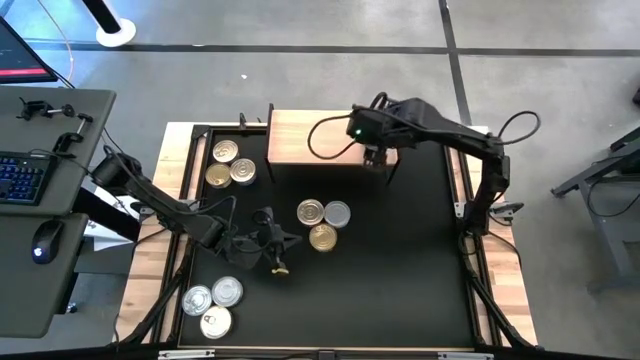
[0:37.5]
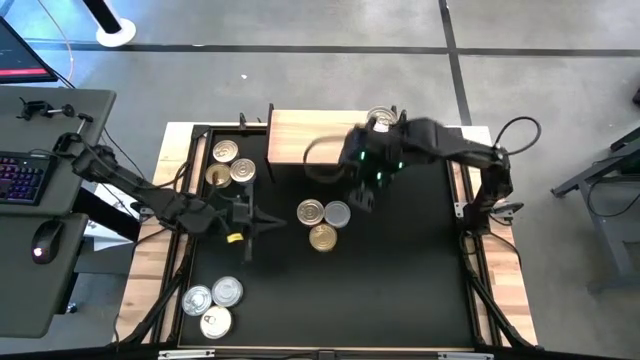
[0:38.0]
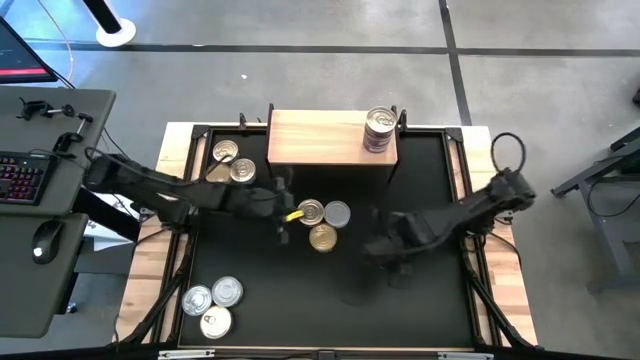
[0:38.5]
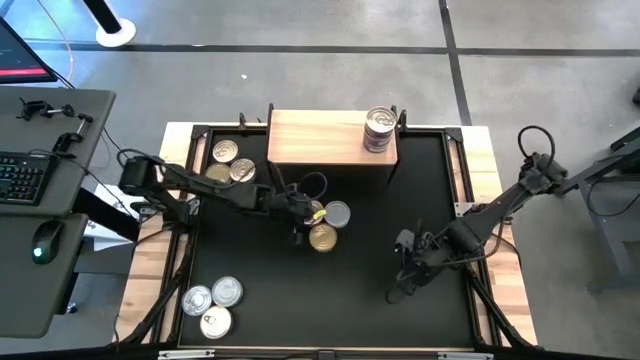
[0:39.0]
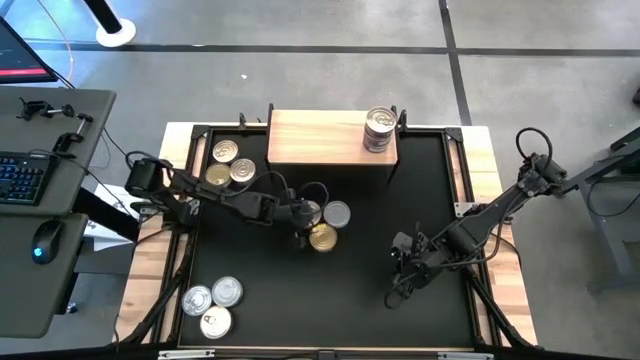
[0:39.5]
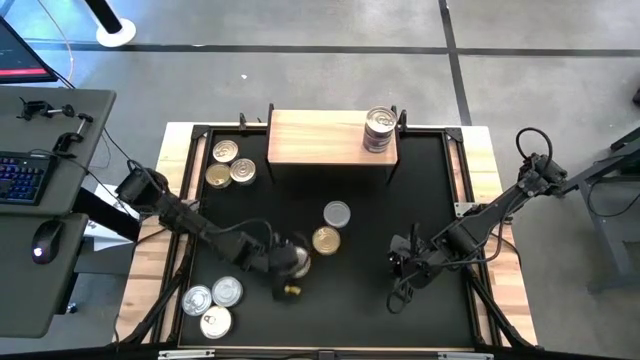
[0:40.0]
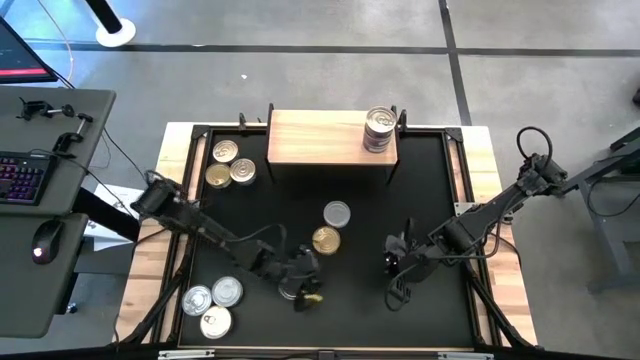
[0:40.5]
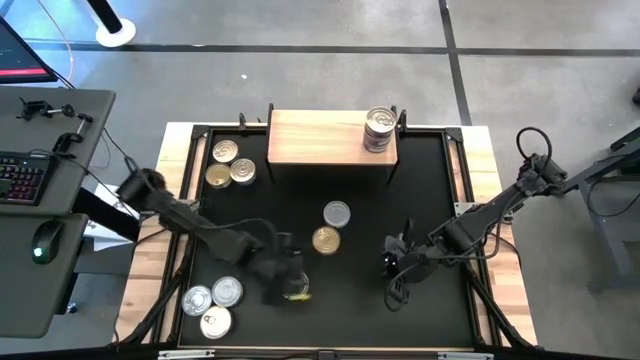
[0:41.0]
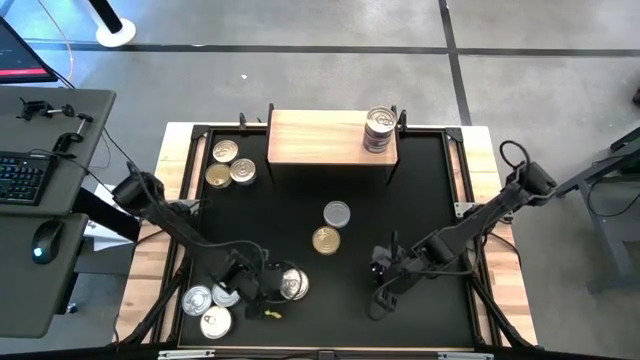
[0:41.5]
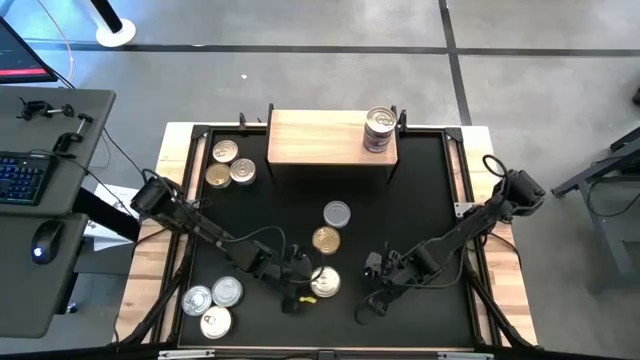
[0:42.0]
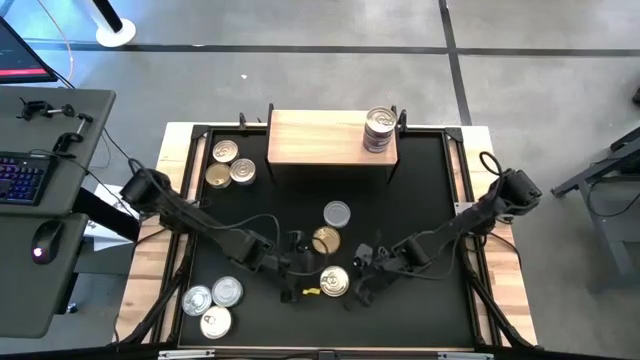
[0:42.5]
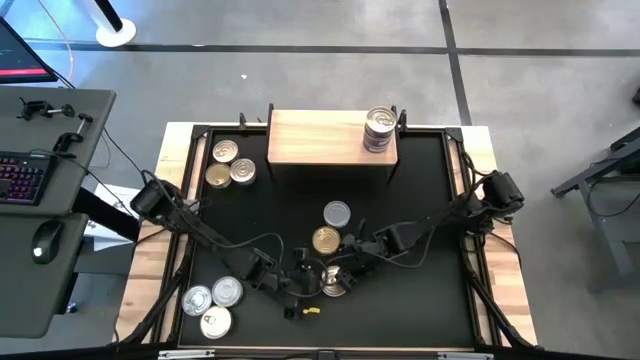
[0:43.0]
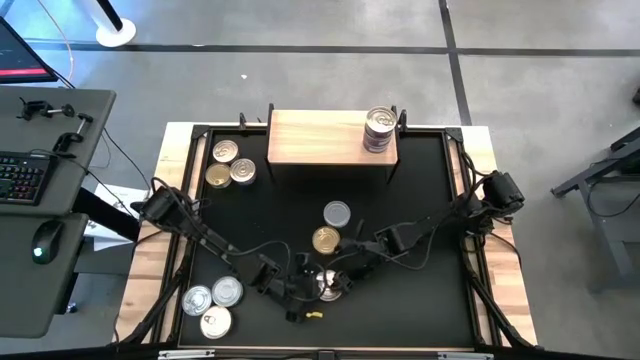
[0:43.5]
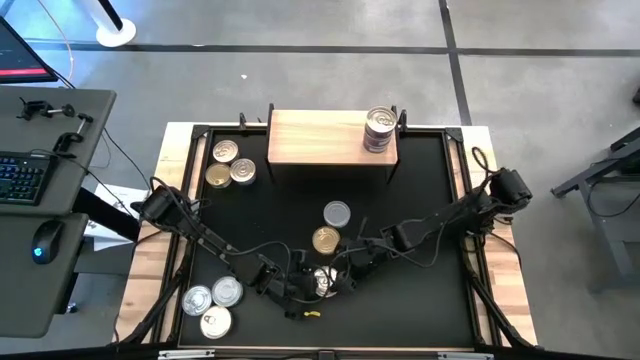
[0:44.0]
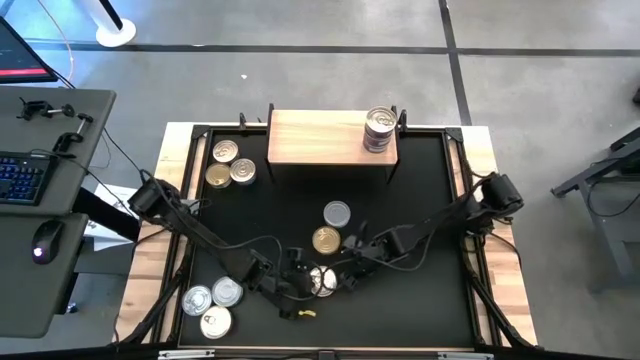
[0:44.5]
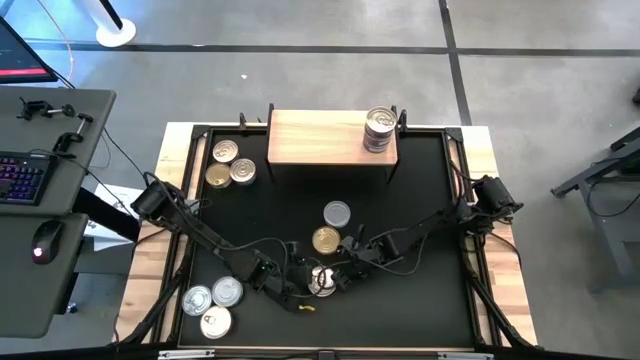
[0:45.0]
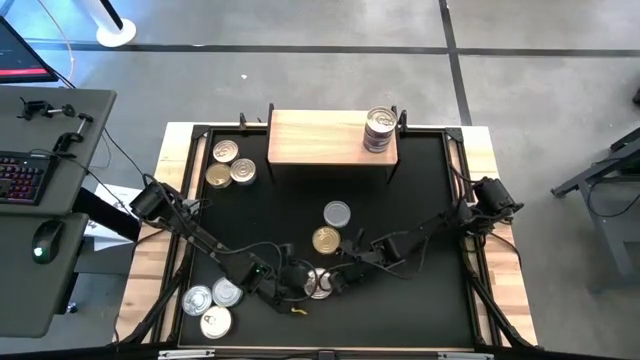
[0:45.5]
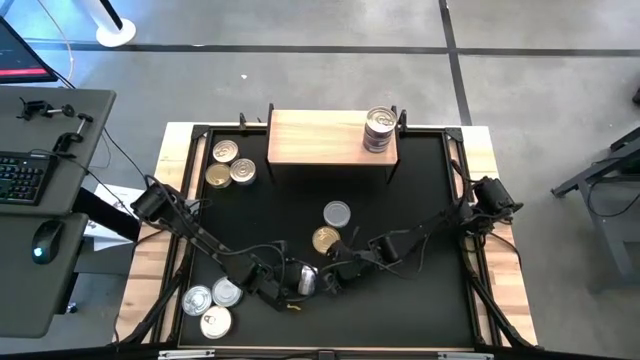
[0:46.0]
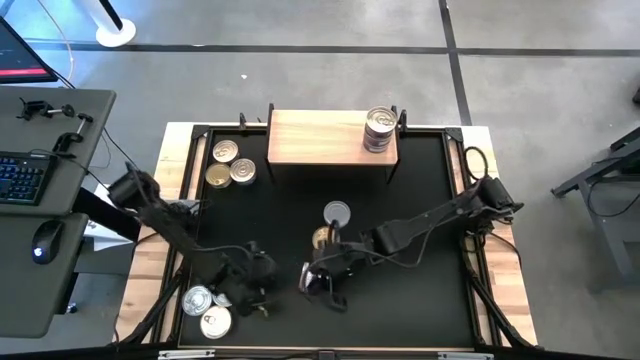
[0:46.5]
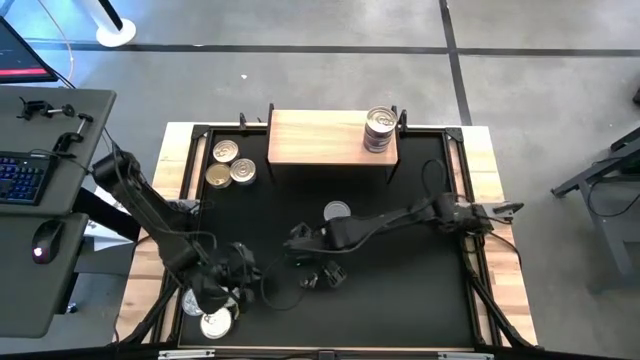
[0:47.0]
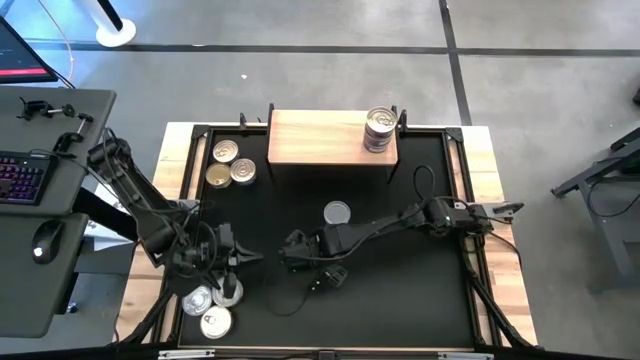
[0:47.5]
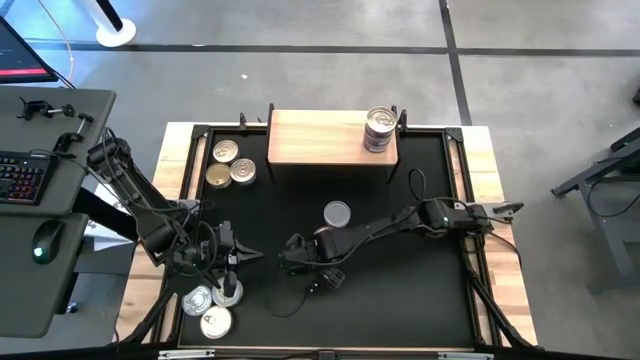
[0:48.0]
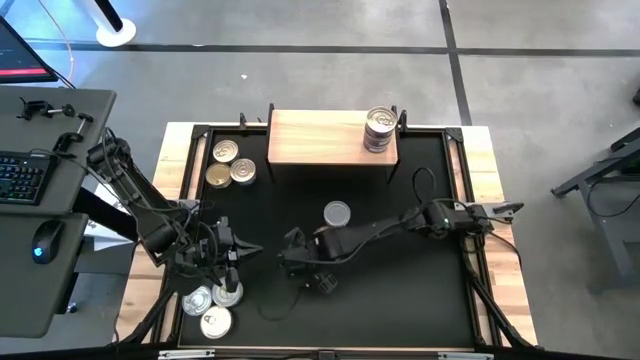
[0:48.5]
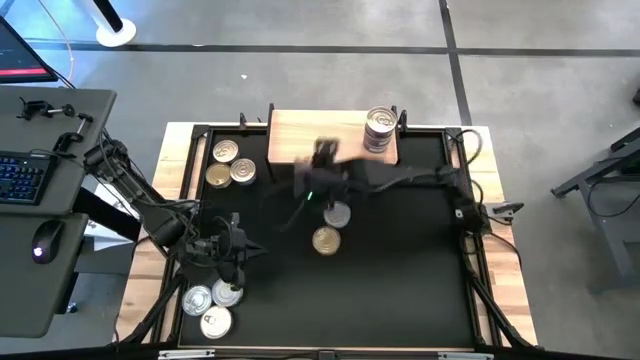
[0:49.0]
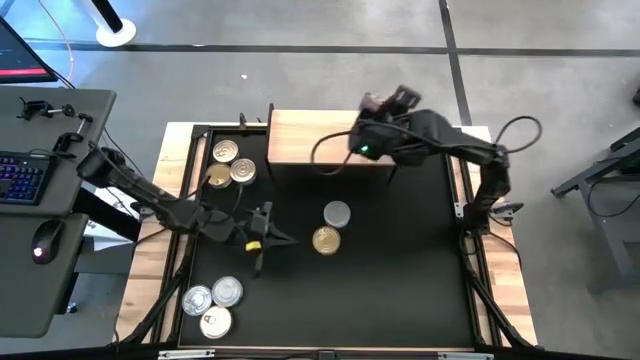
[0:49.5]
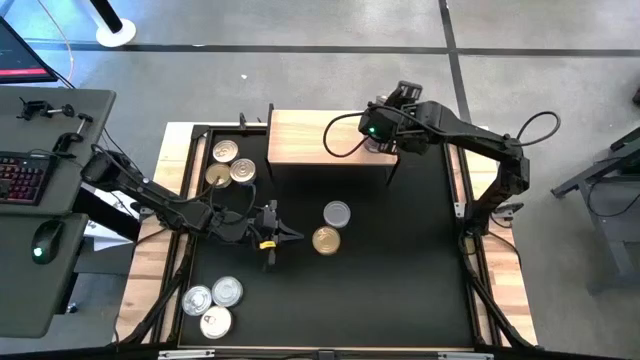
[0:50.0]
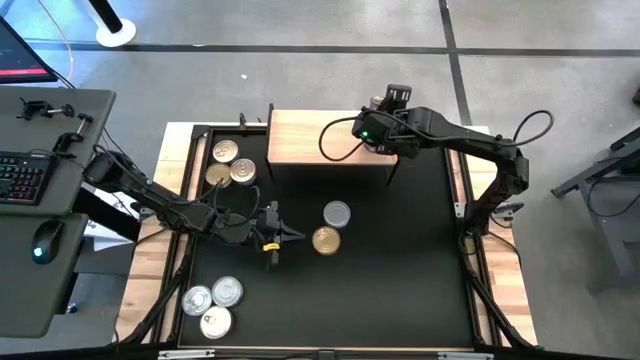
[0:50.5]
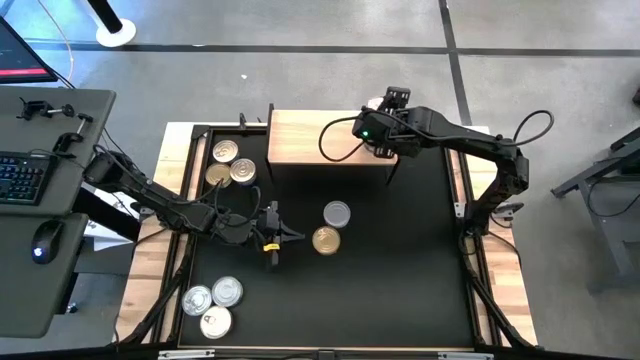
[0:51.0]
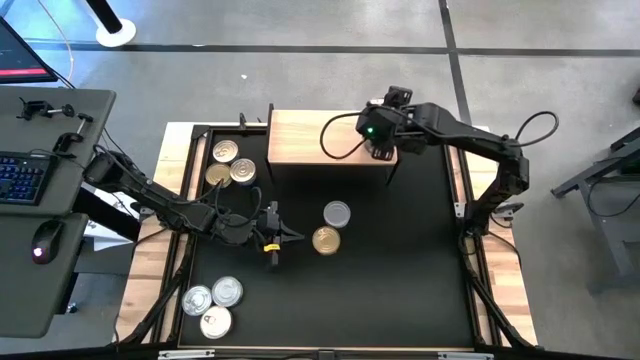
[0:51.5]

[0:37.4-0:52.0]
Task: Stack canned seafood by type on shelf
Stack the blue tuna can on top of the blue tuna can

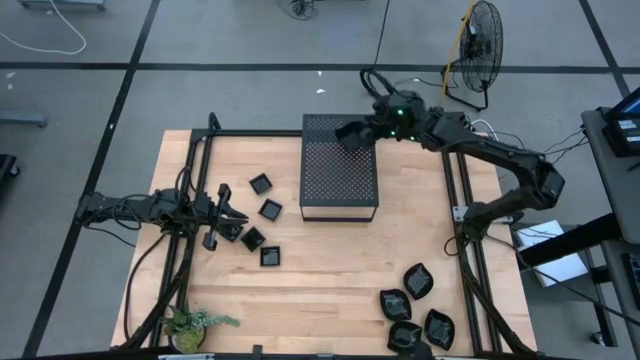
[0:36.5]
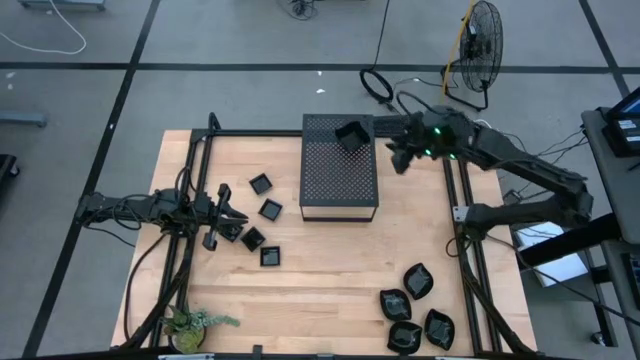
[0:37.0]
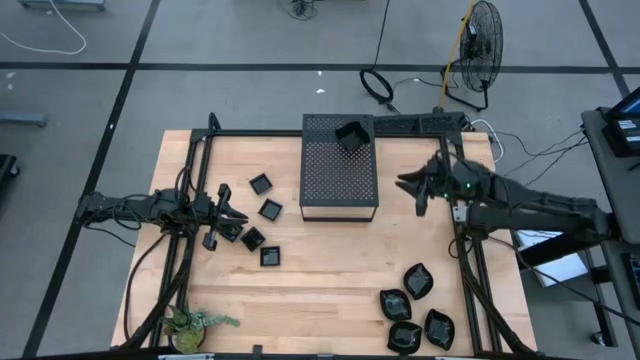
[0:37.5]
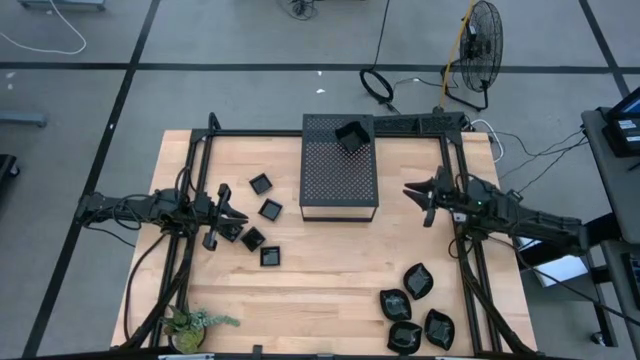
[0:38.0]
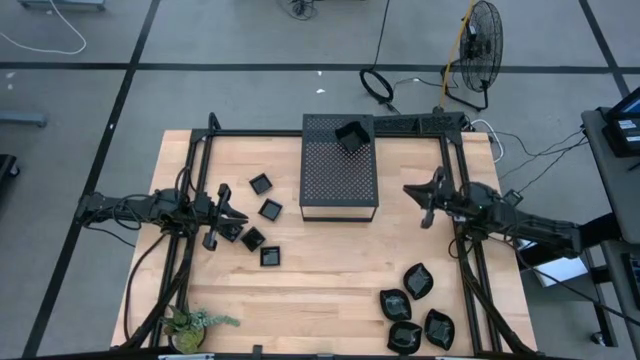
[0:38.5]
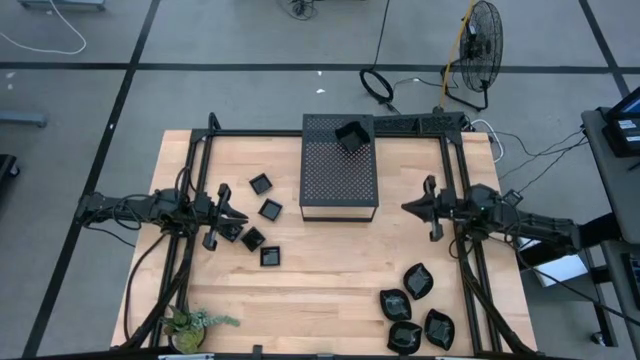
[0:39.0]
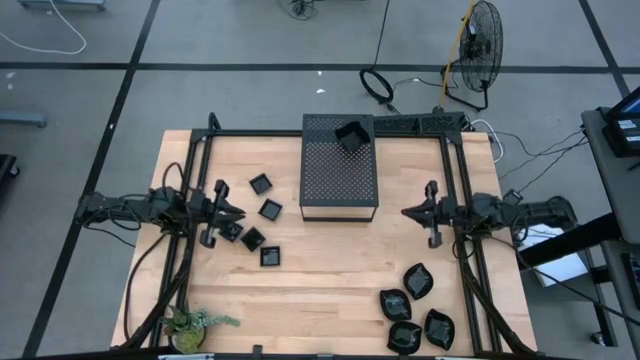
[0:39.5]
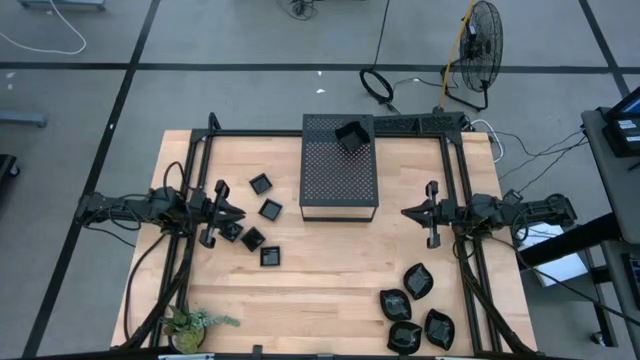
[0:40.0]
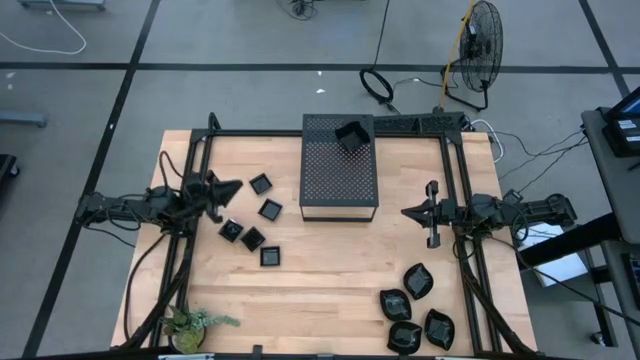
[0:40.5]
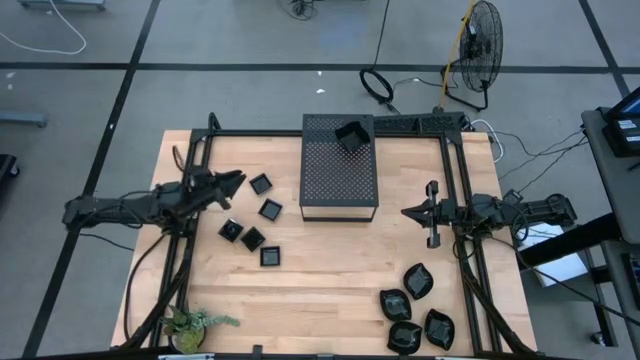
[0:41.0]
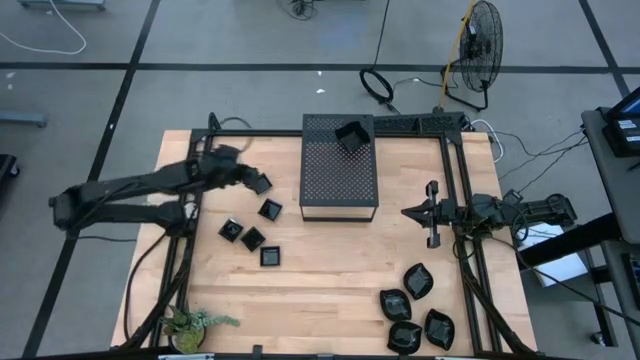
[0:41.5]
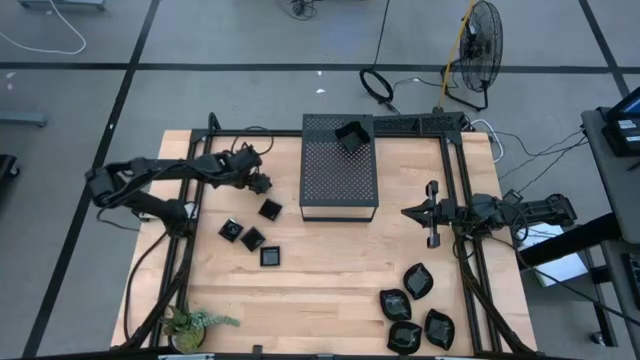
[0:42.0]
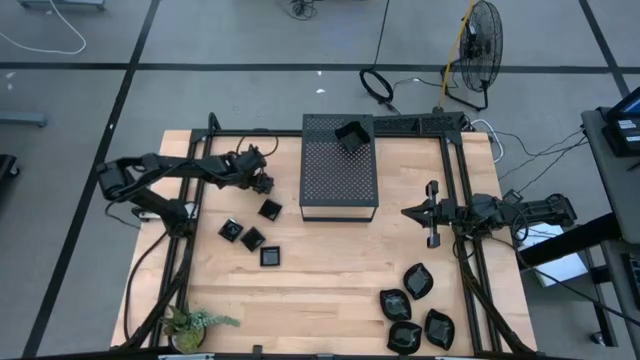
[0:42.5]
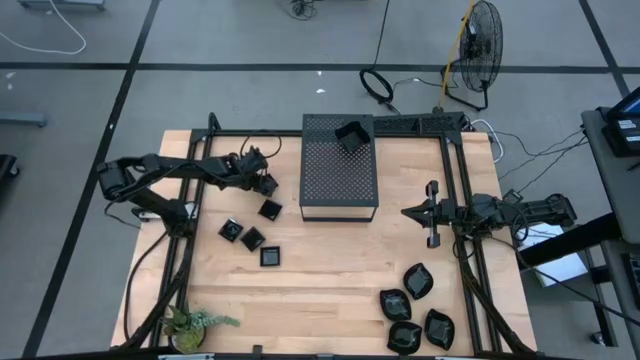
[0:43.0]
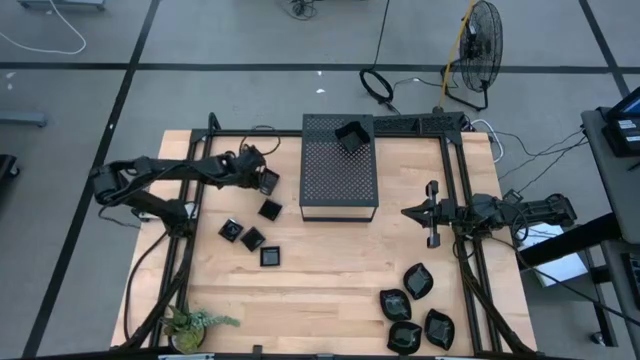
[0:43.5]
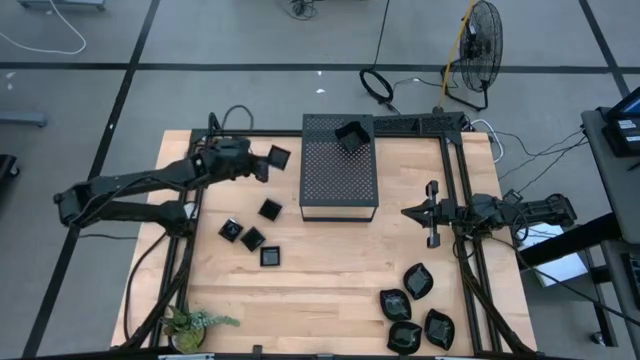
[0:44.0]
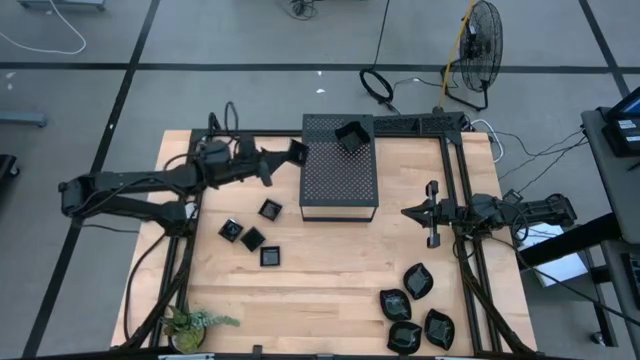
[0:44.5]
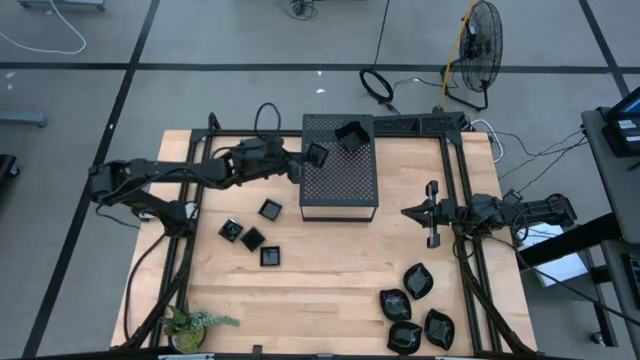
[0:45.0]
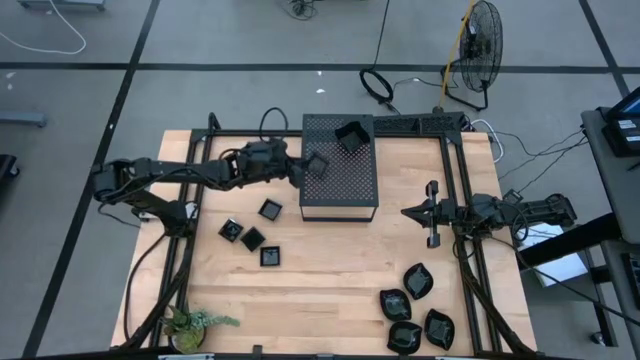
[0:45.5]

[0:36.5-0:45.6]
Task: Pick & Place Mini shaped plates
Put the square plate on the shelf
